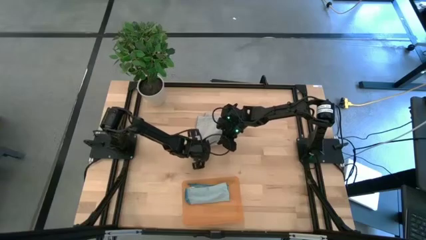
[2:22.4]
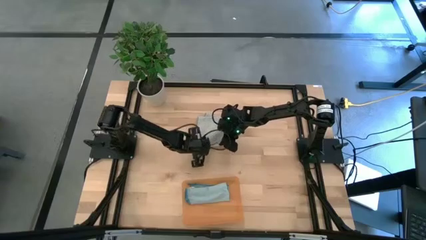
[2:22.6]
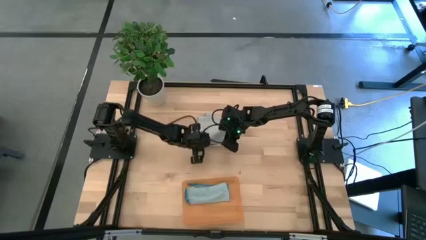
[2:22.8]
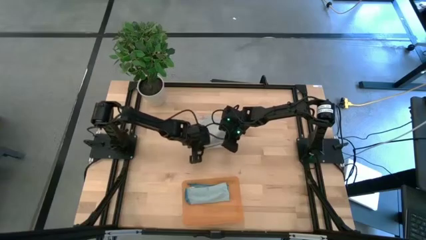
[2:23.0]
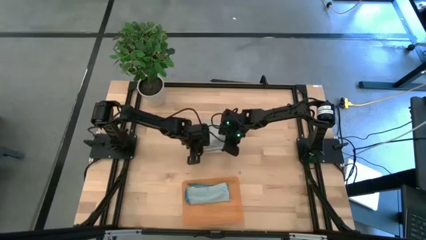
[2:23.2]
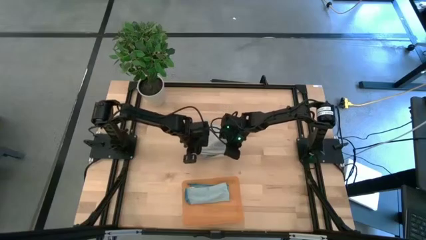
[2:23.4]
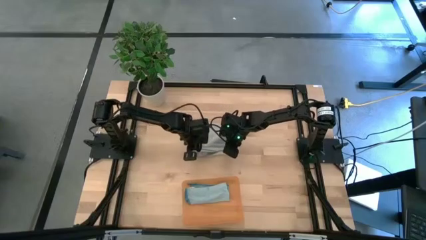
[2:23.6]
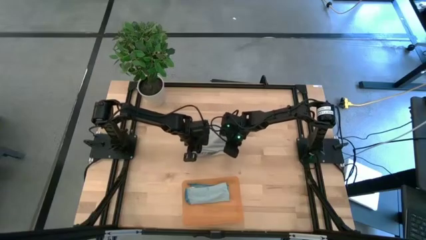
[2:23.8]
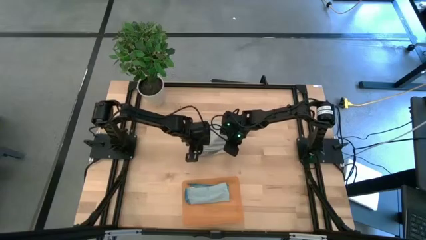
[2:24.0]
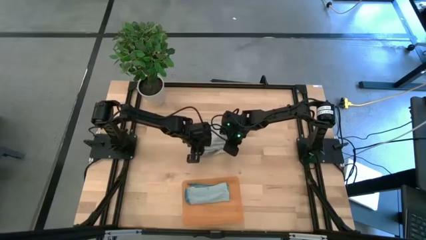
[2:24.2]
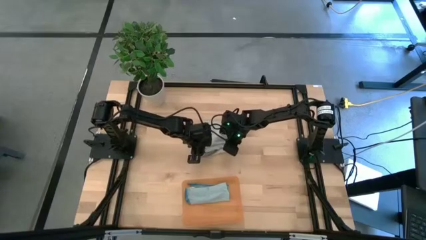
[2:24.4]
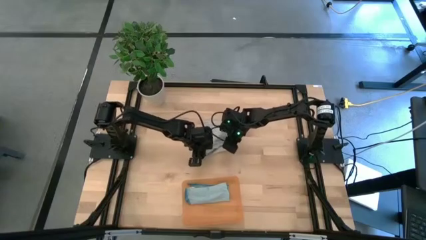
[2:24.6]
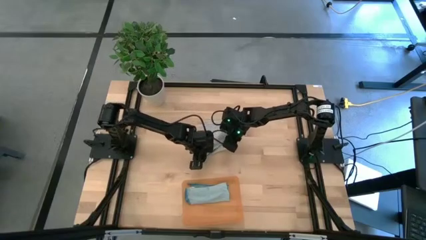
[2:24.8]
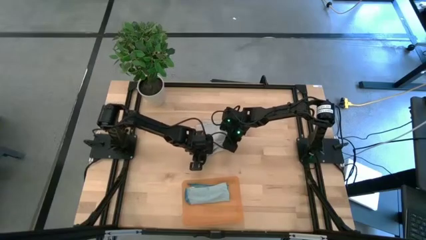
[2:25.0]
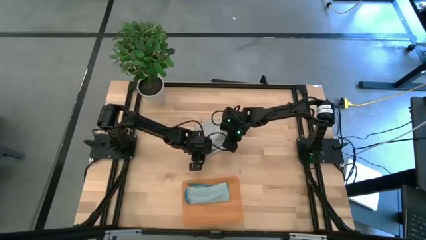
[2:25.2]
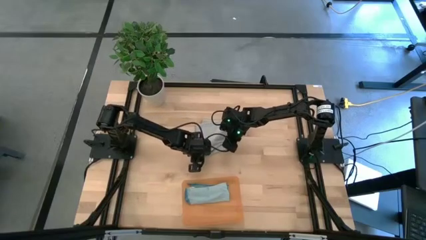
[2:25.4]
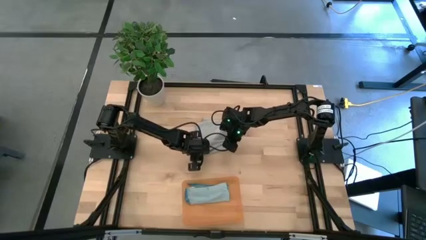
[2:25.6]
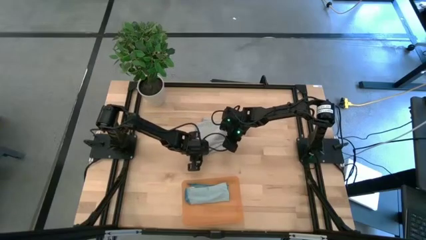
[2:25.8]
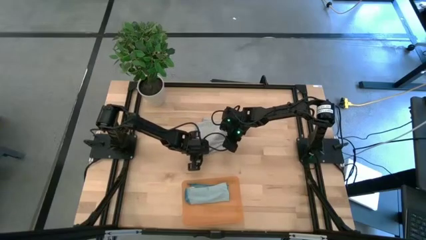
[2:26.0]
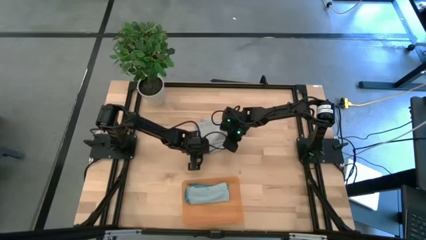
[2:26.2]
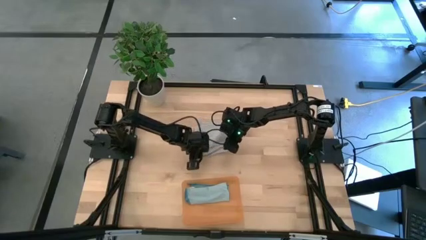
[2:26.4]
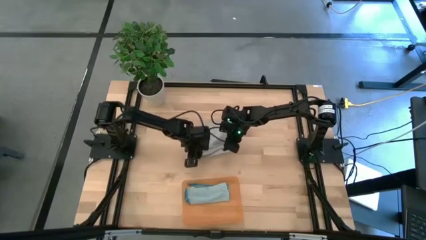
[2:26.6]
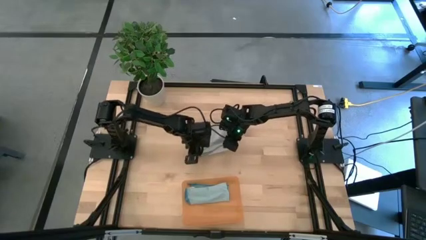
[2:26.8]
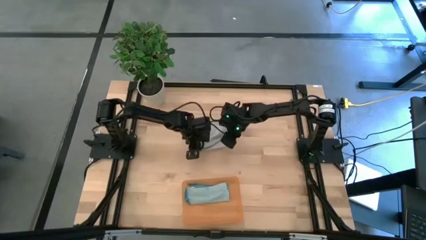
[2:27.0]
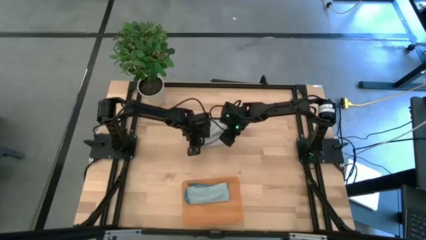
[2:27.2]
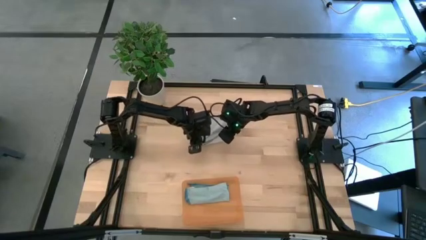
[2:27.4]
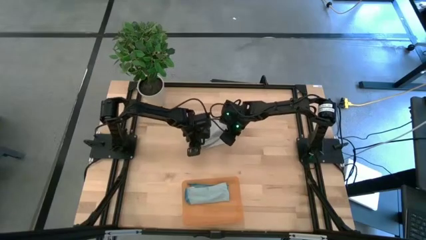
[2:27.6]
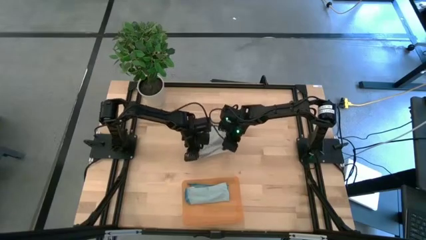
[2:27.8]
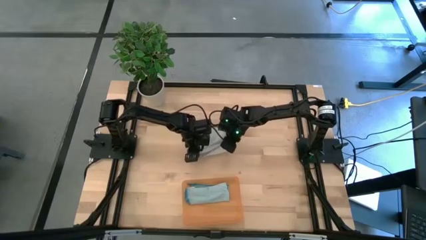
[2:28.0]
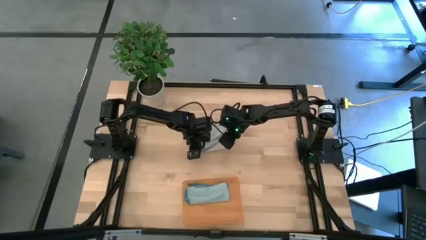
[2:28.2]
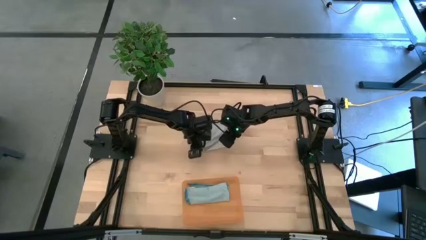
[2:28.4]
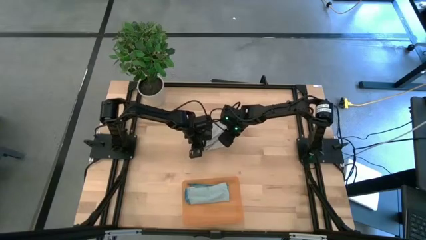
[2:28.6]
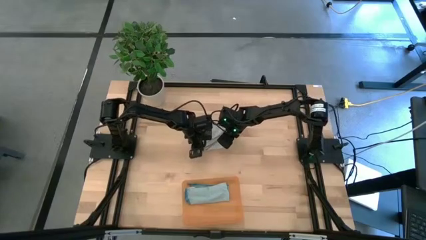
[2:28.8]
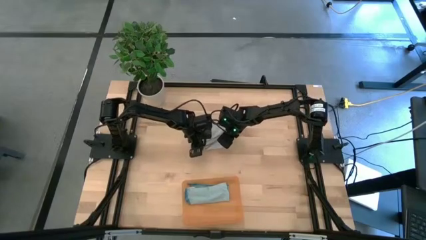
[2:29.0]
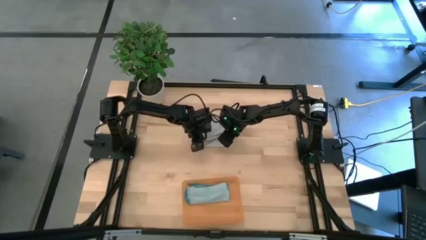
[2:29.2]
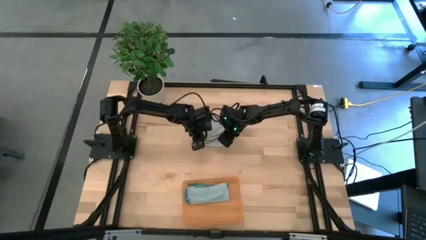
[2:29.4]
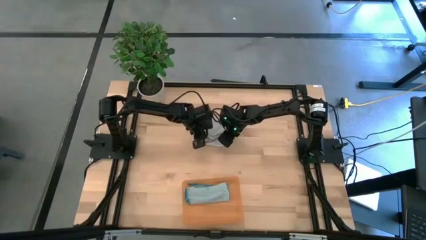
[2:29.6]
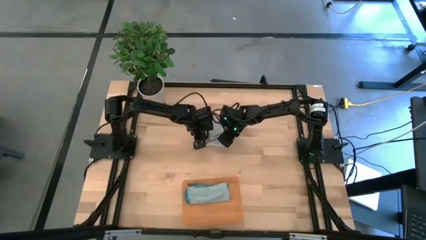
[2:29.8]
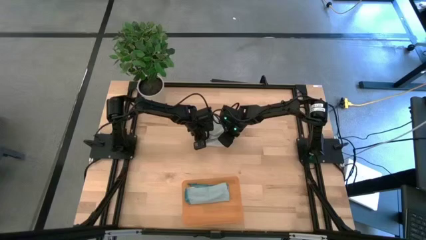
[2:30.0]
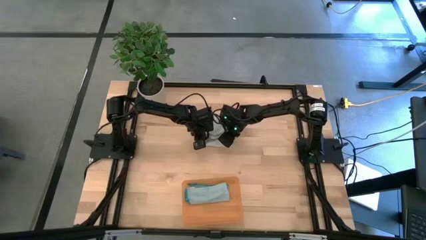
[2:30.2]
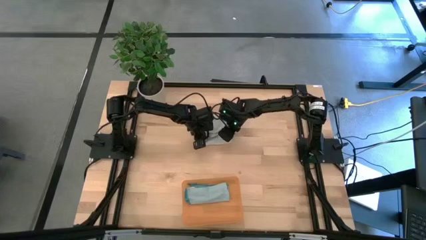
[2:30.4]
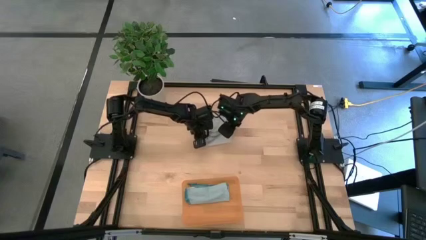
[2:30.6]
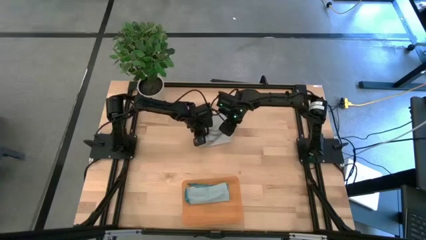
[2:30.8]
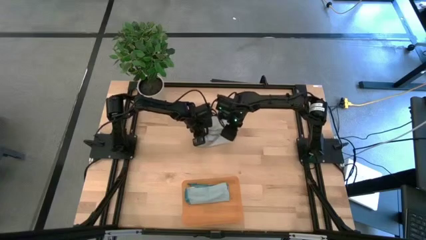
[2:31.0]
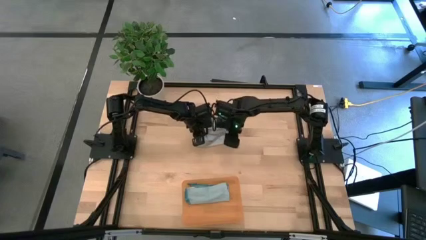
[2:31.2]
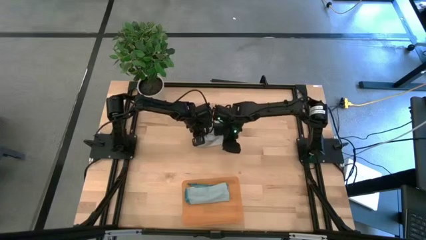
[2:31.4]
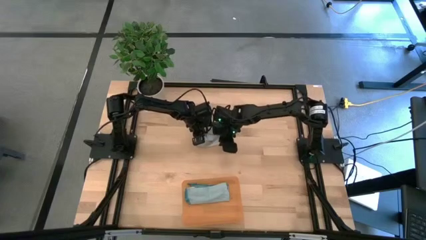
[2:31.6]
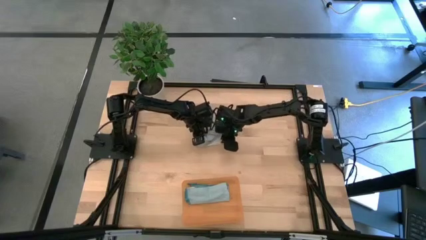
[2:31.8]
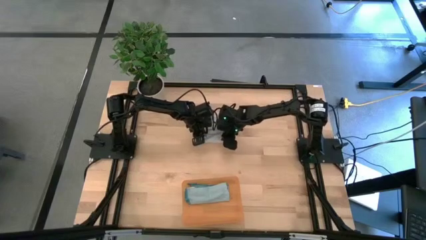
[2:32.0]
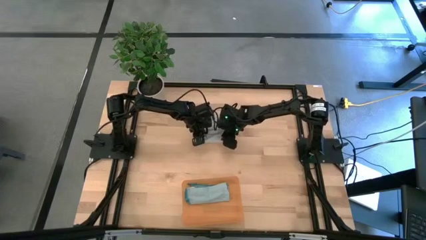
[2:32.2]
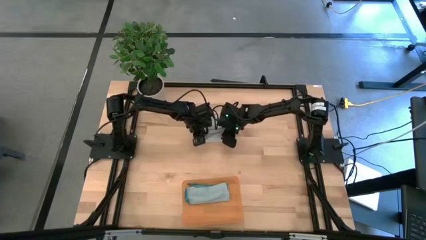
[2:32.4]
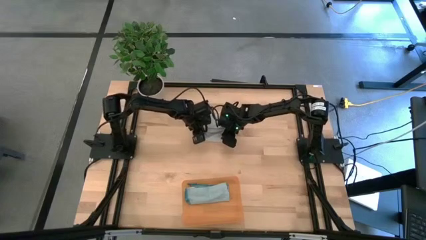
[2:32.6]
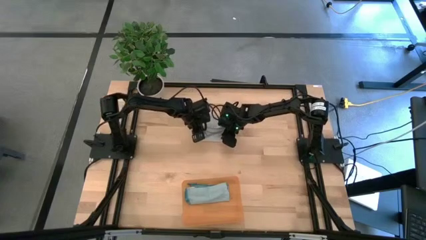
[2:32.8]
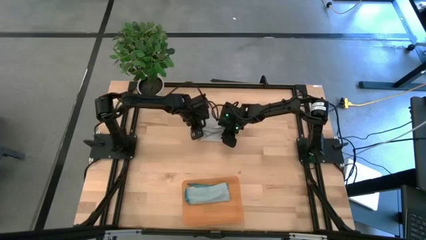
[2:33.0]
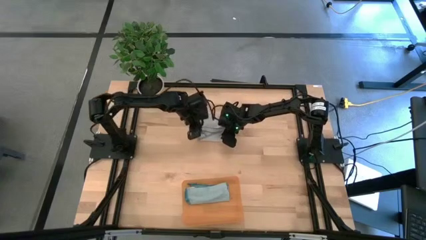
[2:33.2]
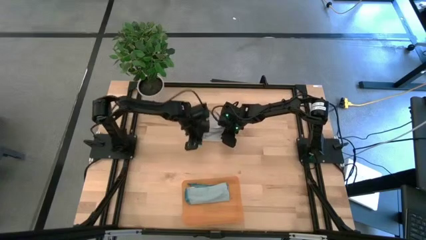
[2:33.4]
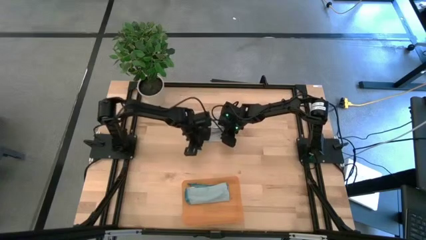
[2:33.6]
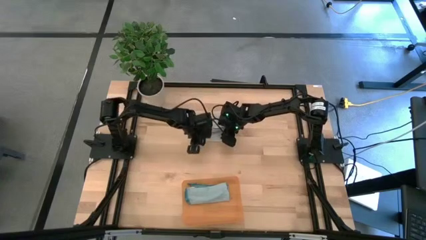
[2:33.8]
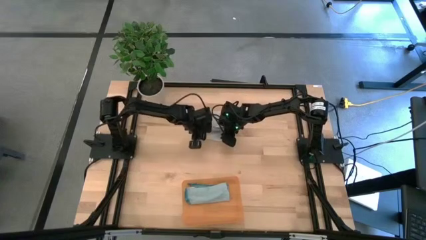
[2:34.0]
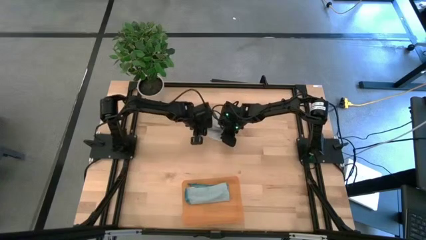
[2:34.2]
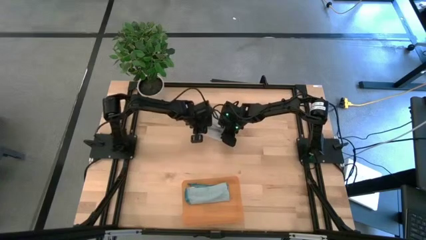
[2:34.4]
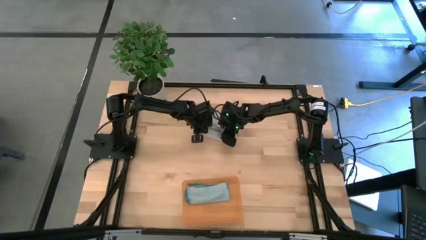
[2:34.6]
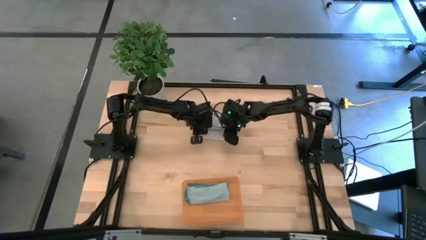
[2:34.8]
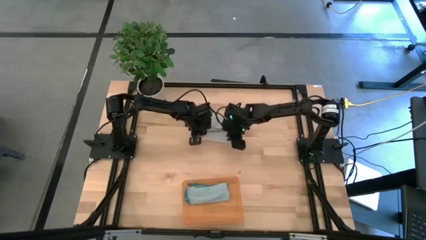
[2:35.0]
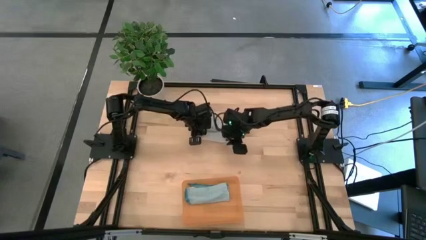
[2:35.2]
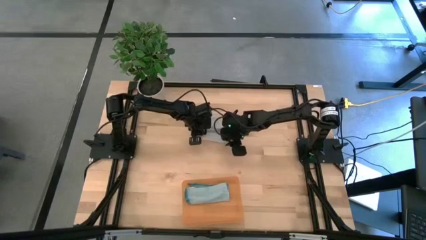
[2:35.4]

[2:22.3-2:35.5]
Task: Roll microfiber towels into tight, uniform cylinder then place into a basket
Roll the gray towel
